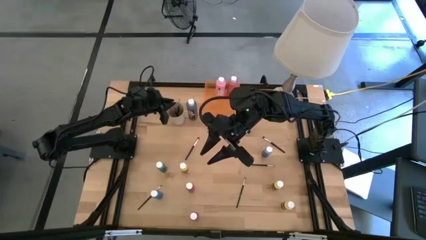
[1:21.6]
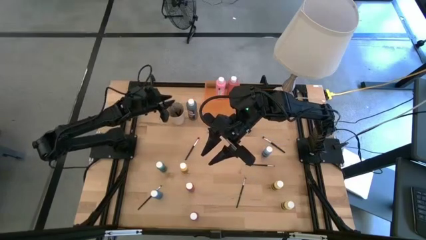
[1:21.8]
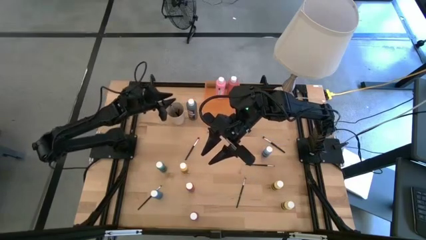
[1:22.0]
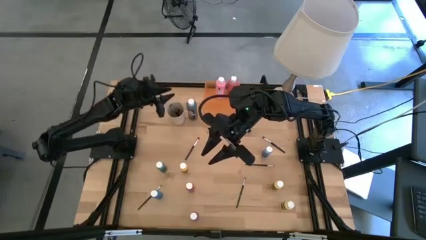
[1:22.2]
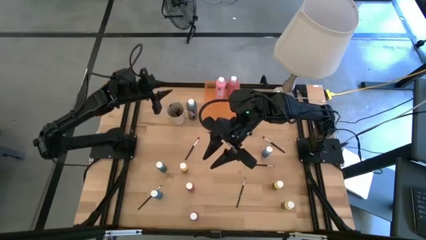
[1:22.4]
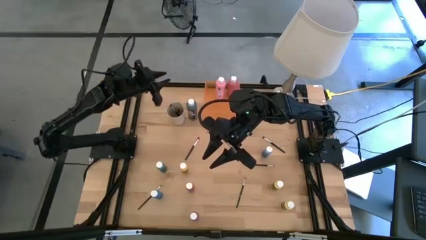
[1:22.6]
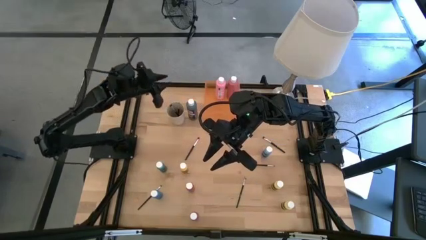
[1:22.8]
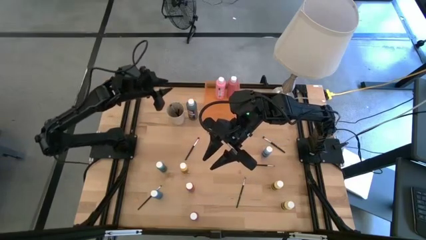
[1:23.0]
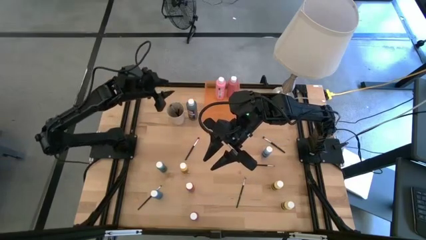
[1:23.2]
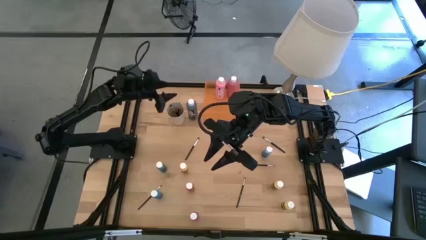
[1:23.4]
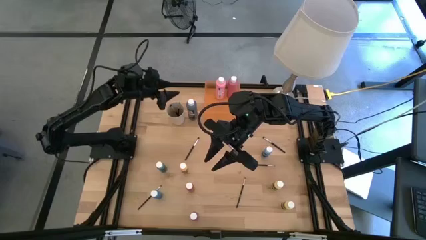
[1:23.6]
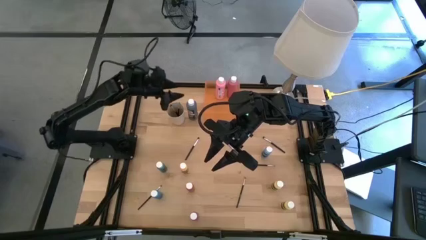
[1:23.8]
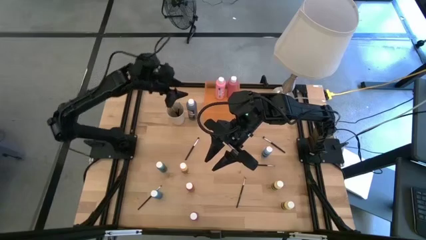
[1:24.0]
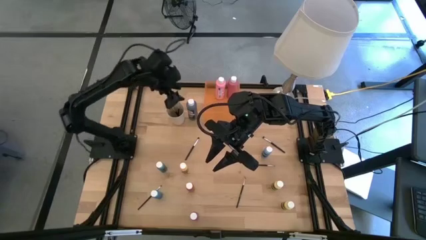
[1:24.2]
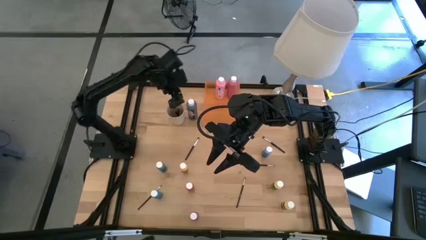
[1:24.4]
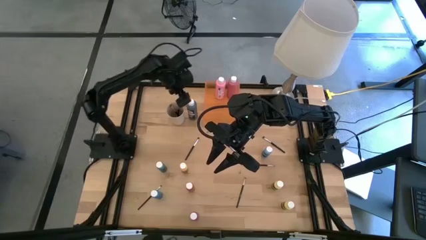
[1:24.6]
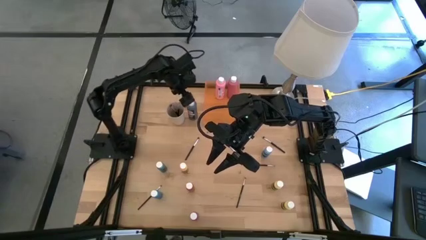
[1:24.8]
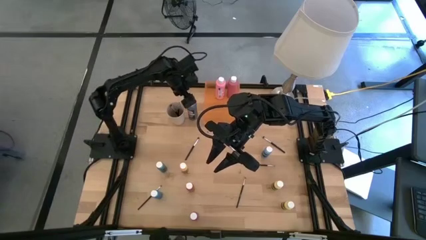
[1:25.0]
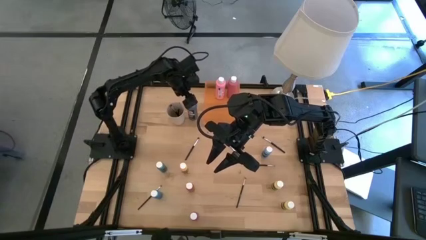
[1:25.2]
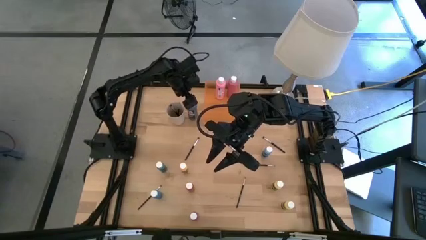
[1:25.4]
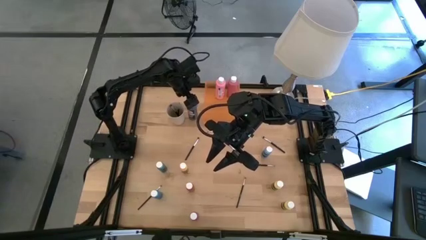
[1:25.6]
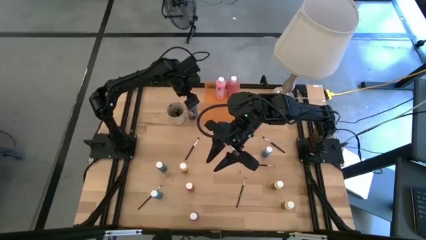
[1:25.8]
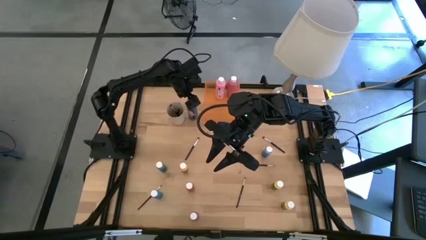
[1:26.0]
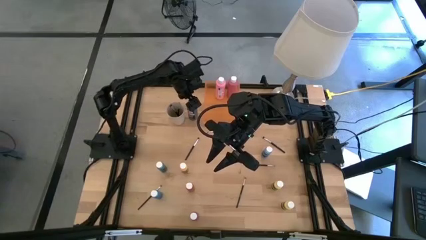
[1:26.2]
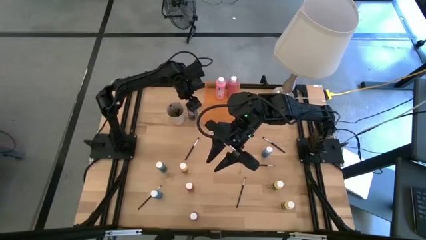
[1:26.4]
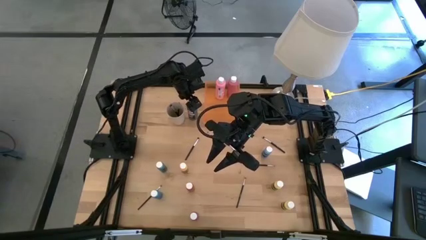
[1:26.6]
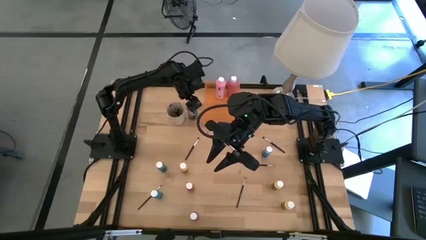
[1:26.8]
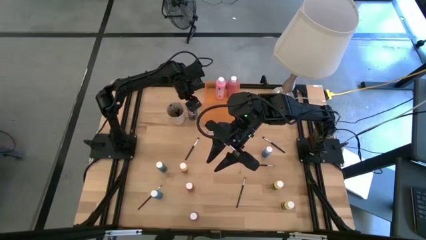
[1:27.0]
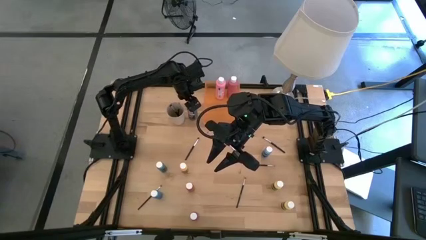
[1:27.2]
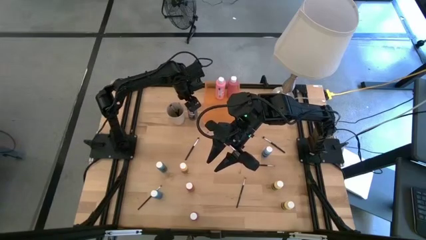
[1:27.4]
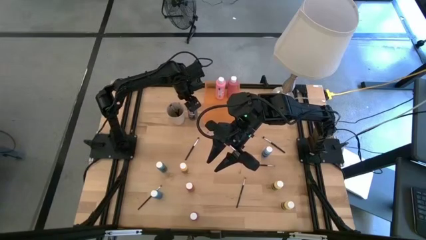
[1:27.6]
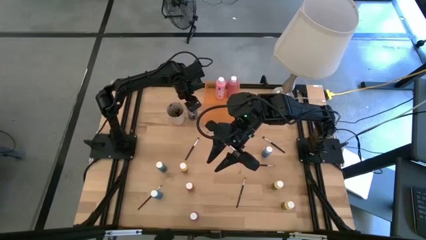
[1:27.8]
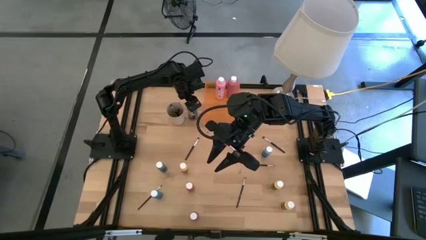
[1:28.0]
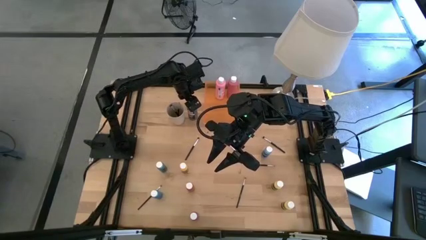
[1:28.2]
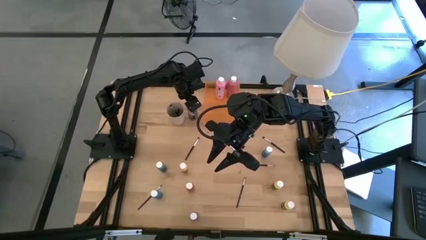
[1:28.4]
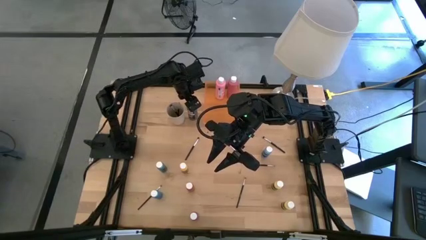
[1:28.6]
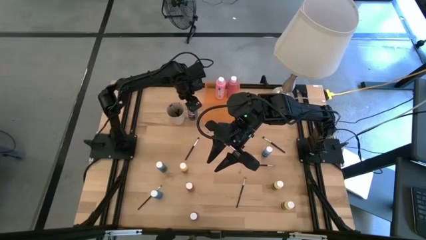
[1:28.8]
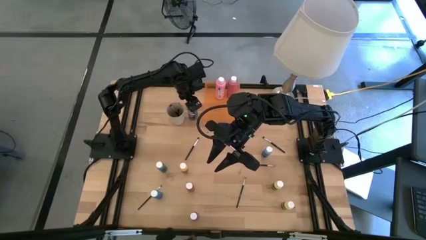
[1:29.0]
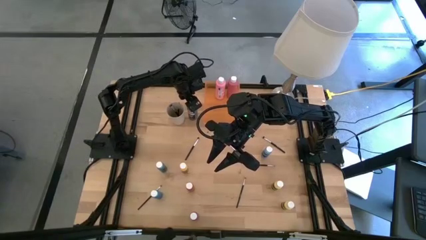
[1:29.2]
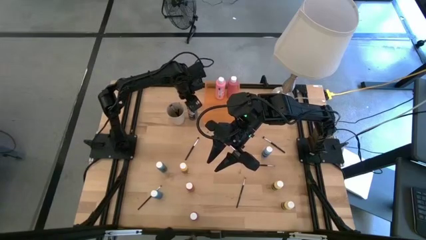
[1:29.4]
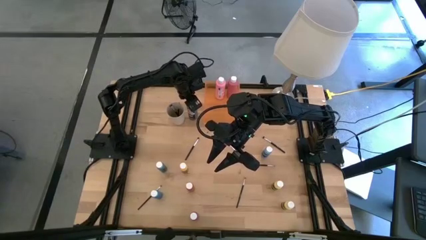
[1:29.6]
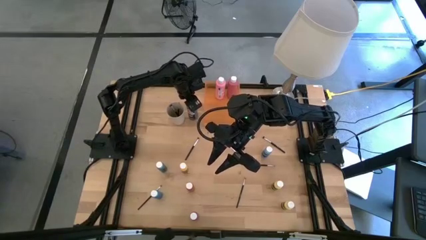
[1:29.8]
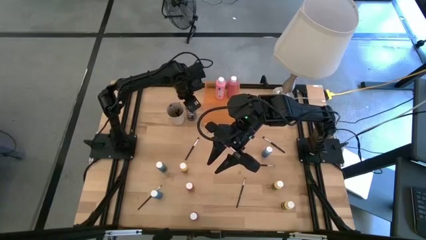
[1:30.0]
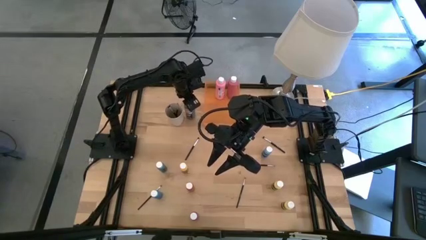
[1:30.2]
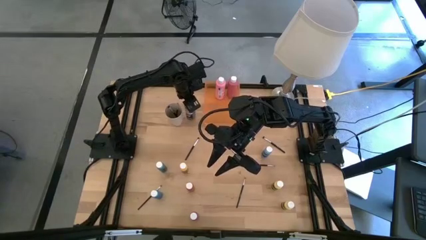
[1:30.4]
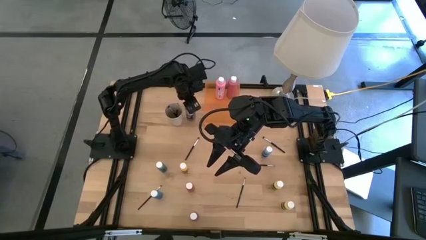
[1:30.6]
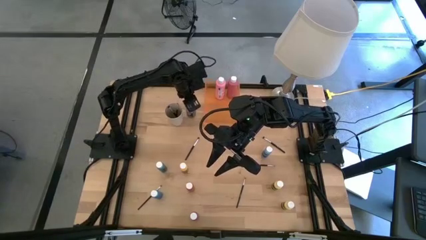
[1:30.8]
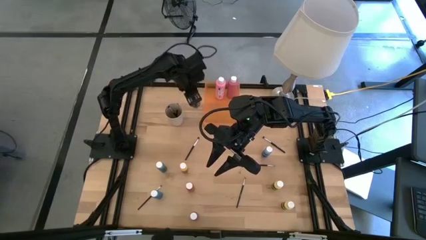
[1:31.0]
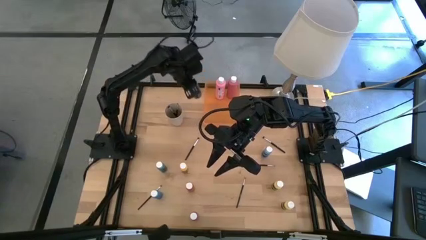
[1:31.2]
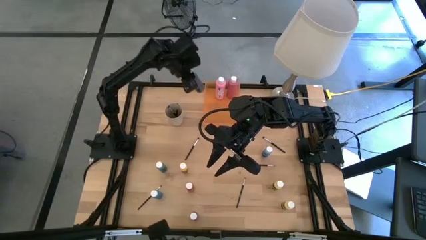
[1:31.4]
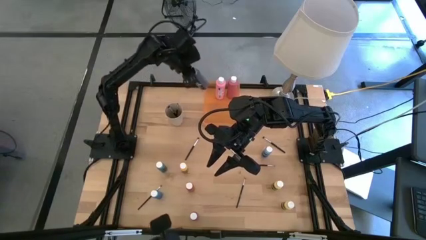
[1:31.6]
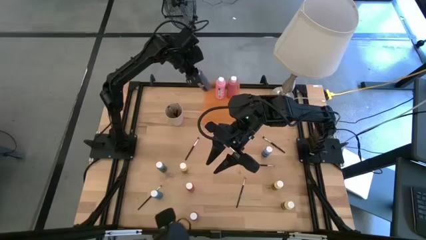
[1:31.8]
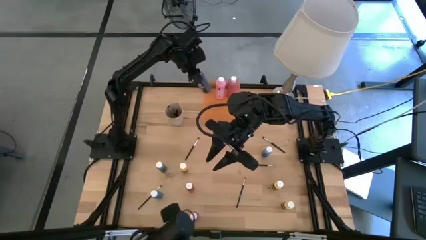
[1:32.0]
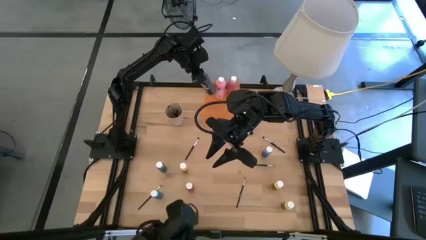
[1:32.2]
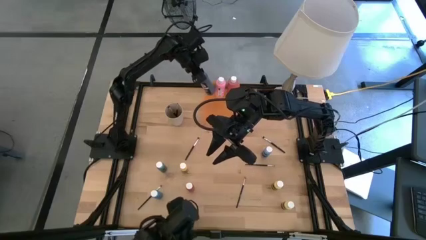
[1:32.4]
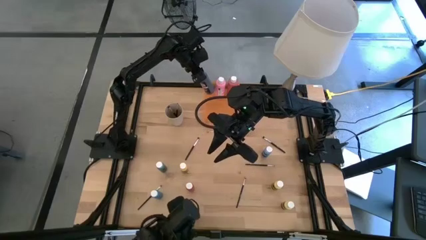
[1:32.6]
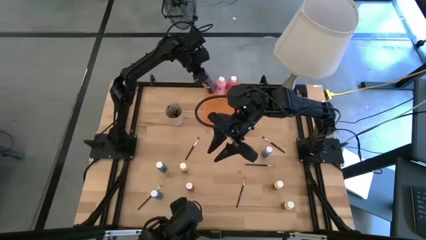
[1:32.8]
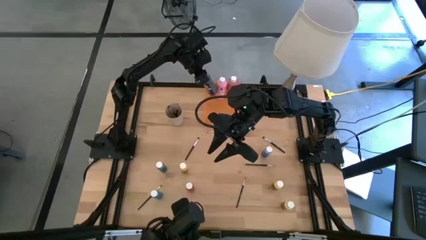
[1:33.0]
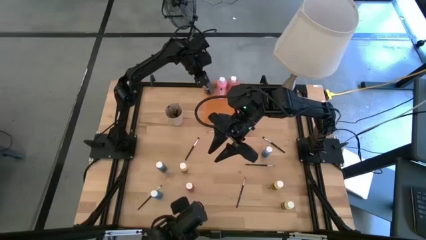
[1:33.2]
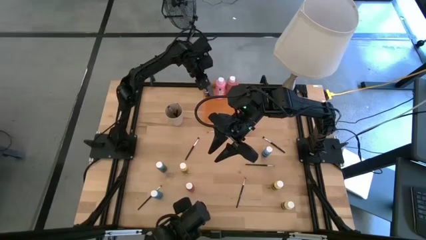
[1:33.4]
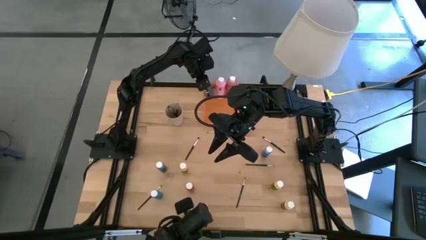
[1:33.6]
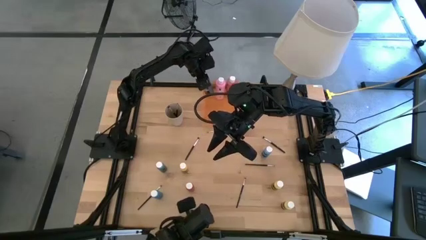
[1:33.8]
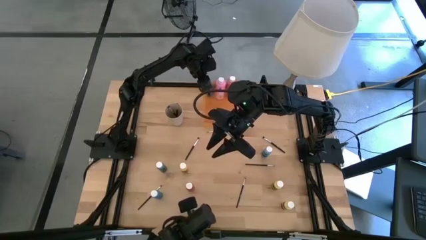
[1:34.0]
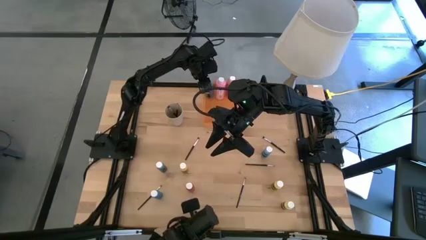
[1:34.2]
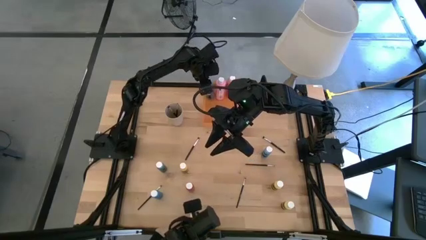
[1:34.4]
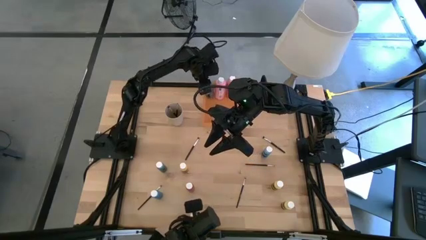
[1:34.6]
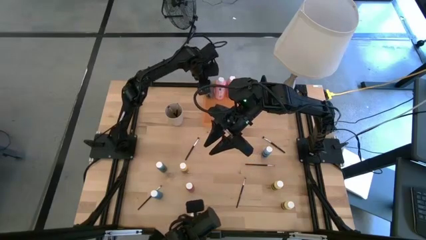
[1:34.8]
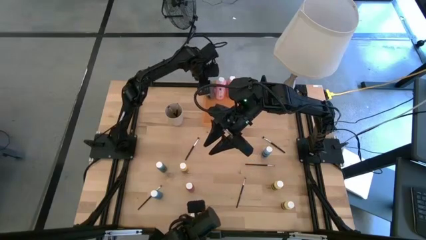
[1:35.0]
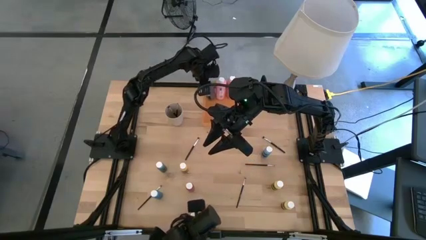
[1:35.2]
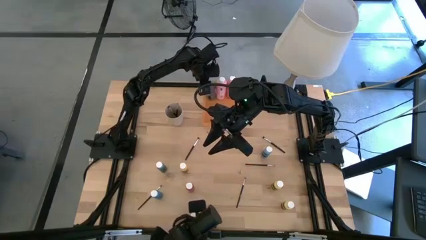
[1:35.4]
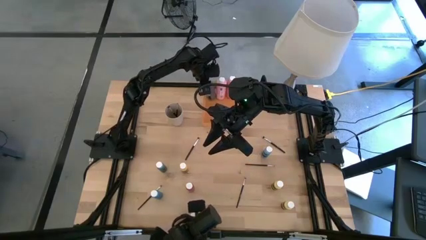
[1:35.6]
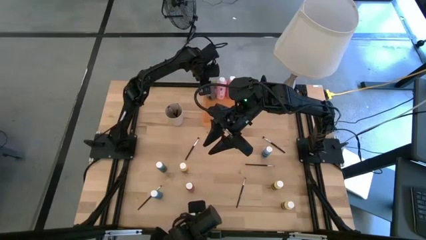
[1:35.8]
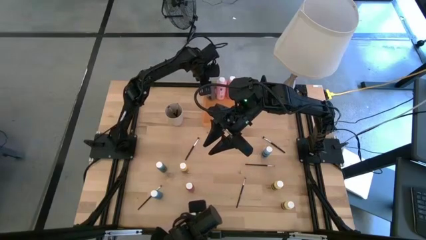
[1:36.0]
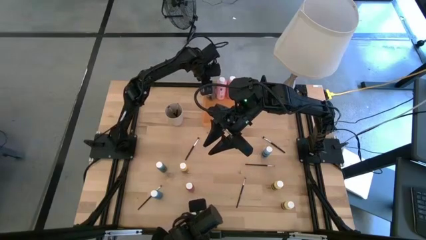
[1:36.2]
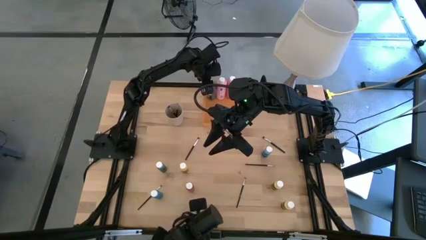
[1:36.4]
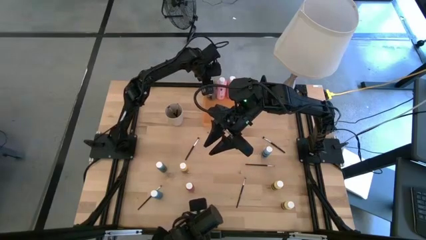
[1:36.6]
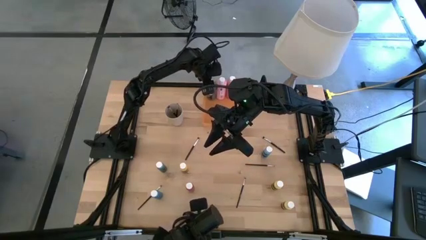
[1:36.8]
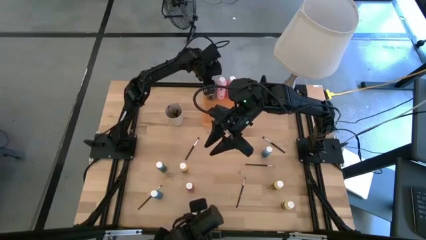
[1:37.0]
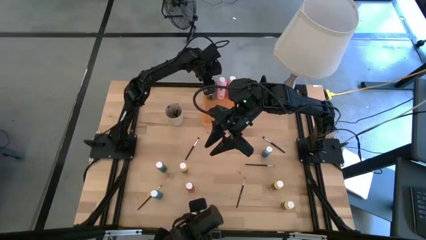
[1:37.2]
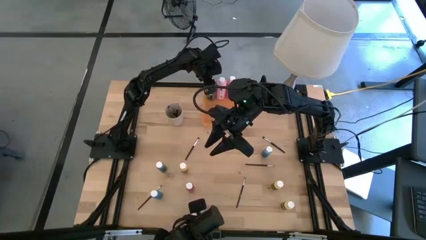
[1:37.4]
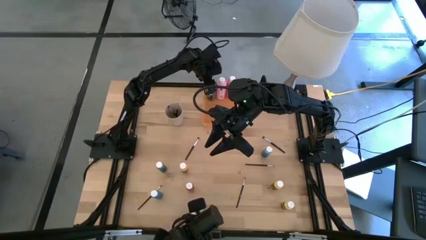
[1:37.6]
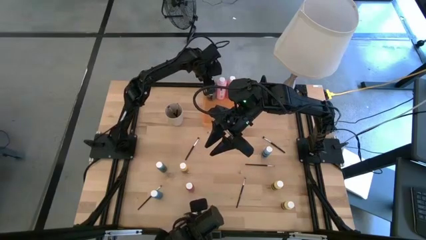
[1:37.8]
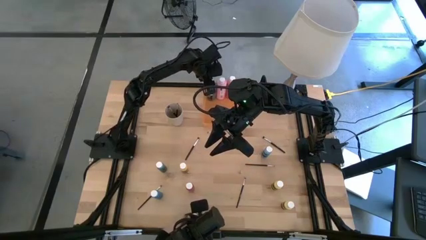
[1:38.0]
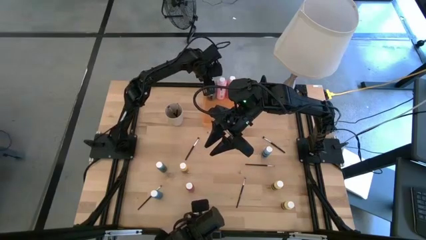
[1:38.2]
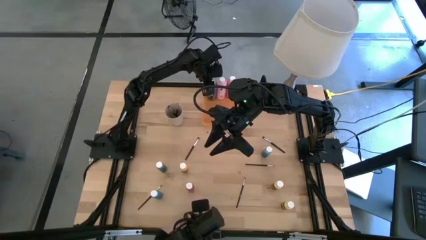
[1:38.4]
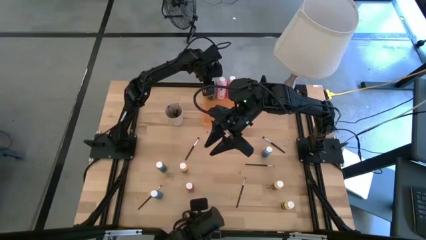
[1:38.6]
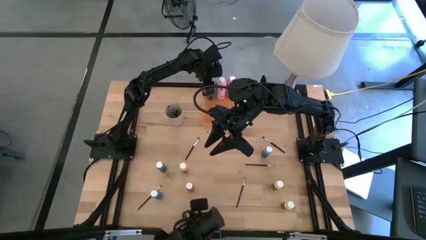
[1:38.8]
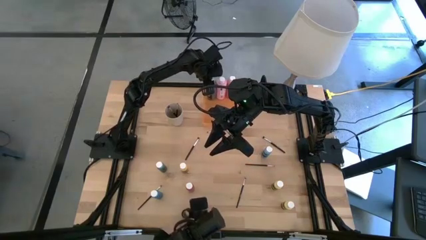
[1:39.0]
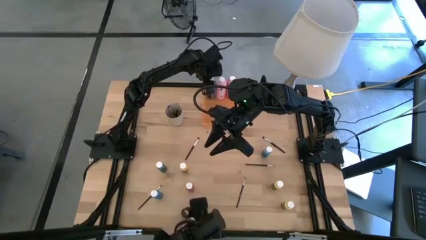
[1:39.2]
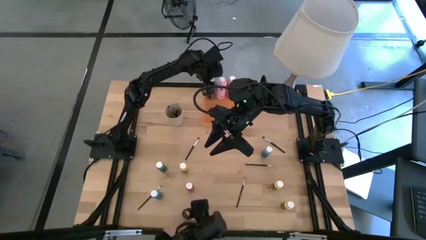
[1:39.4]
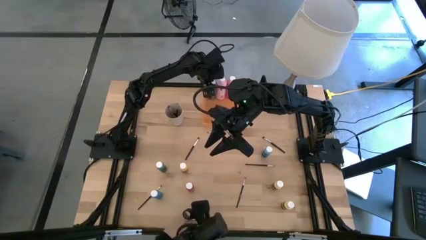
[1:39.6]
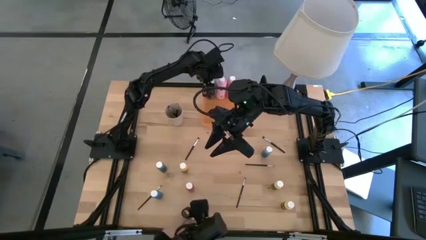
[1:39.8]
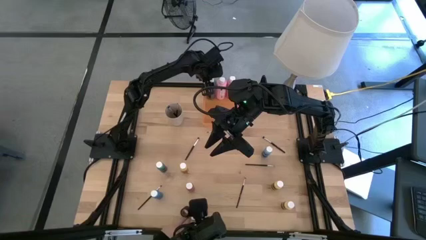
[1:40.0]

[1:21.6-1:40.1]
Task: Pick & Place Paint Supplies
Put the black paint bottle into the orange bin
